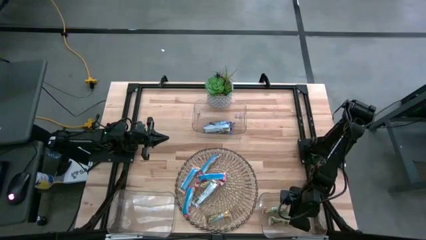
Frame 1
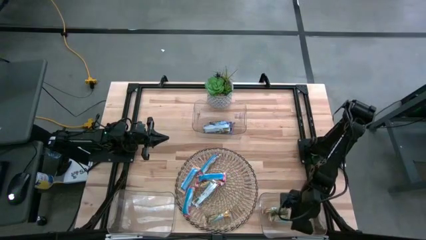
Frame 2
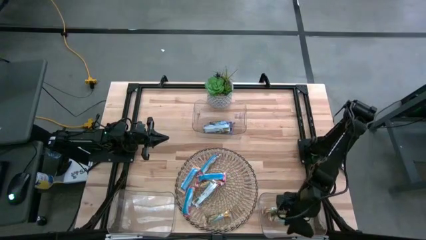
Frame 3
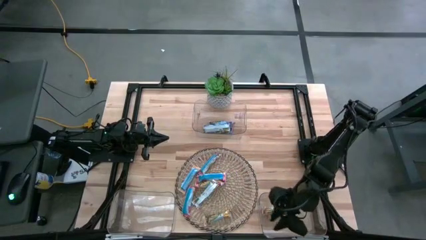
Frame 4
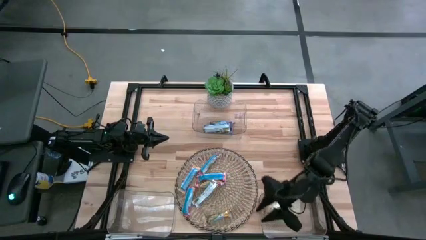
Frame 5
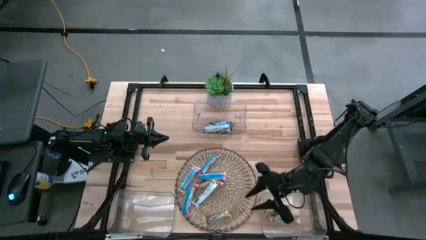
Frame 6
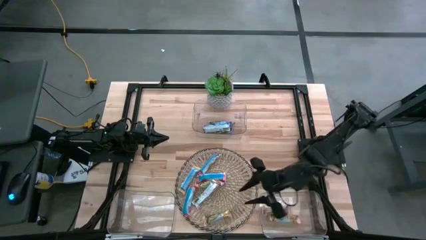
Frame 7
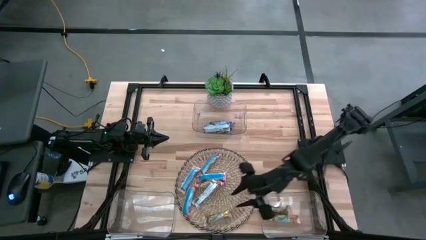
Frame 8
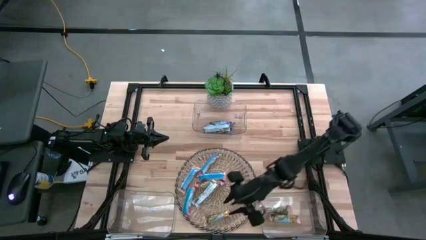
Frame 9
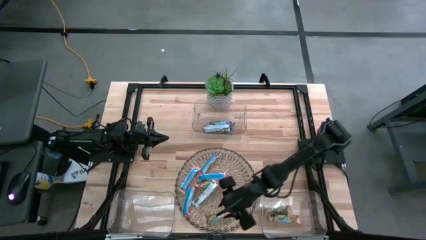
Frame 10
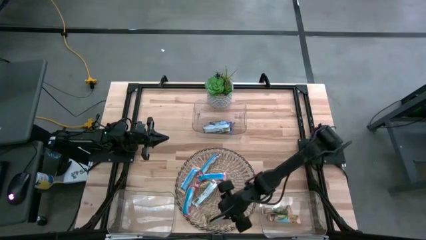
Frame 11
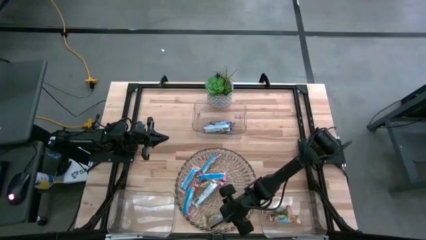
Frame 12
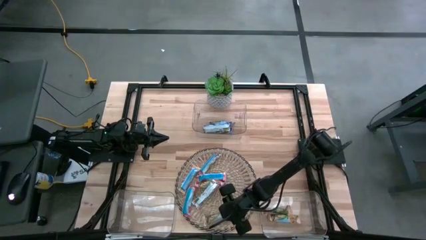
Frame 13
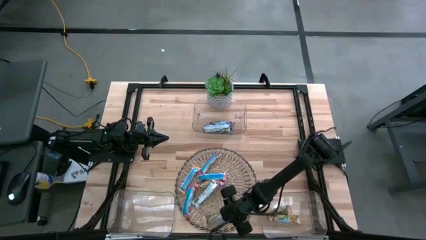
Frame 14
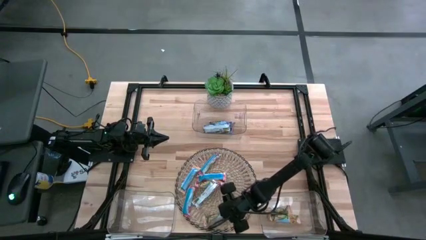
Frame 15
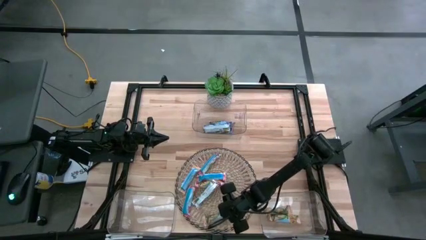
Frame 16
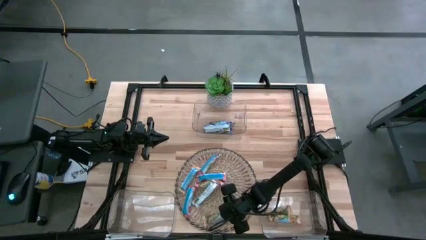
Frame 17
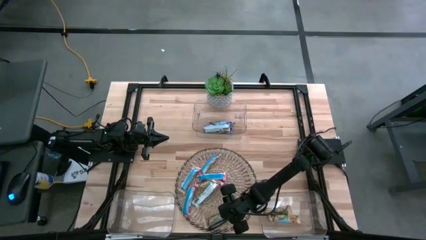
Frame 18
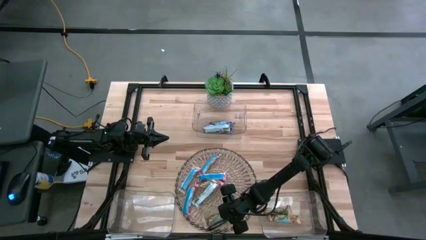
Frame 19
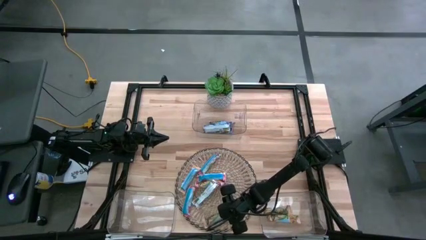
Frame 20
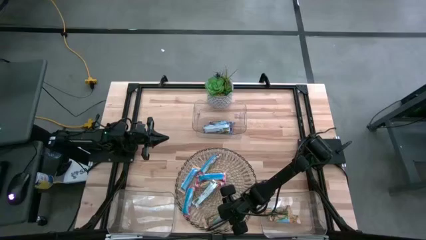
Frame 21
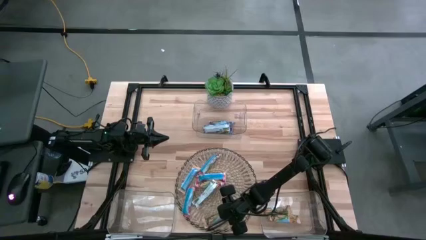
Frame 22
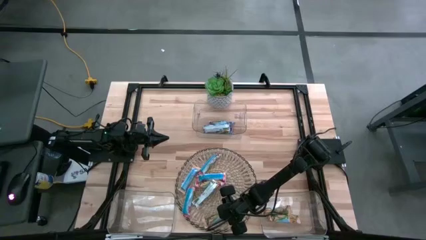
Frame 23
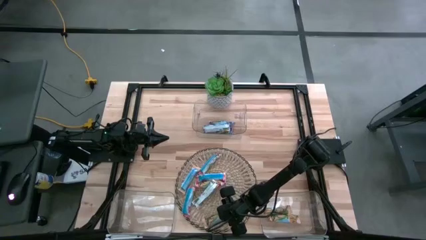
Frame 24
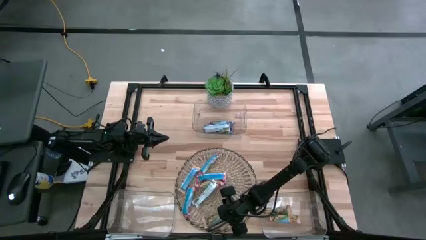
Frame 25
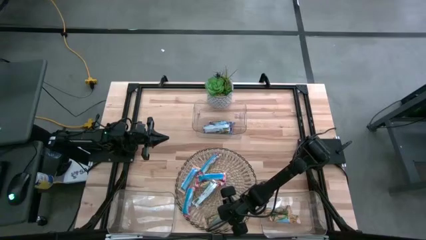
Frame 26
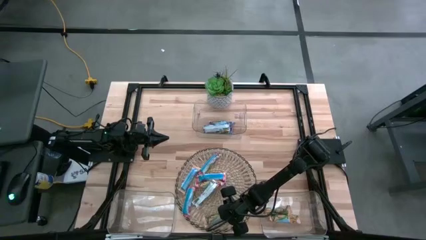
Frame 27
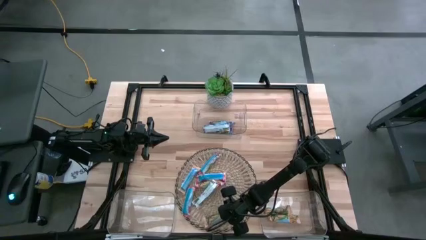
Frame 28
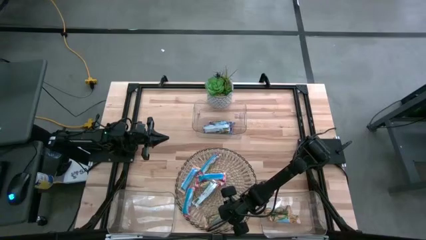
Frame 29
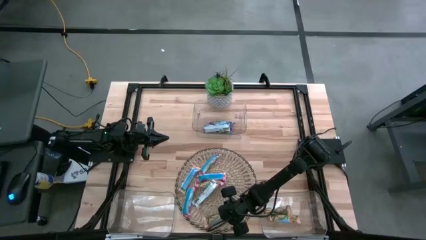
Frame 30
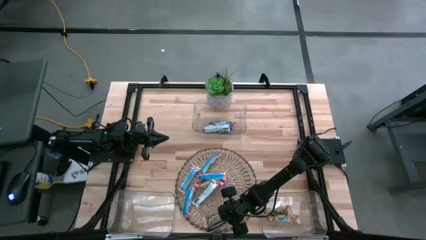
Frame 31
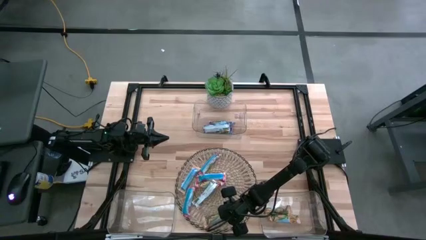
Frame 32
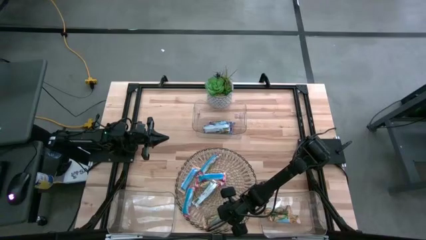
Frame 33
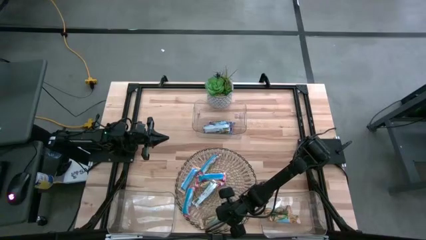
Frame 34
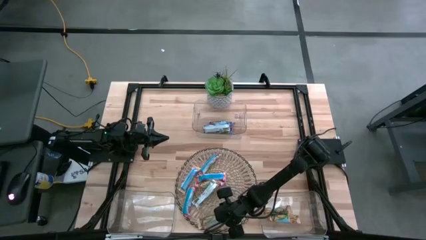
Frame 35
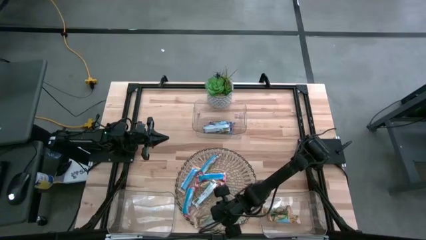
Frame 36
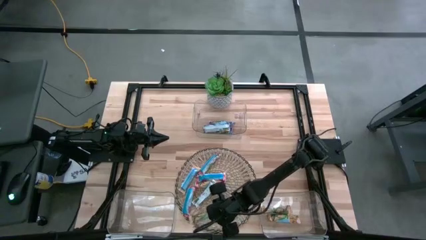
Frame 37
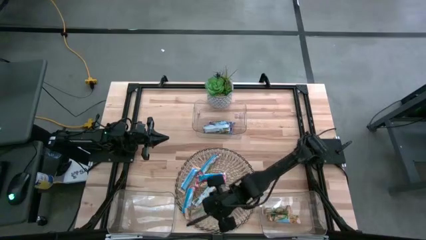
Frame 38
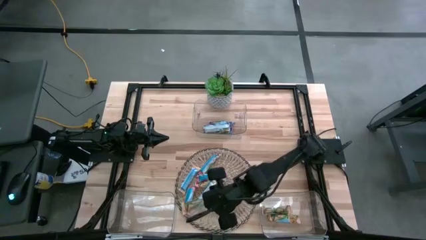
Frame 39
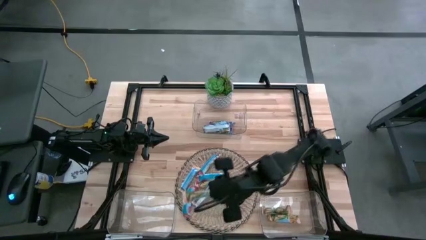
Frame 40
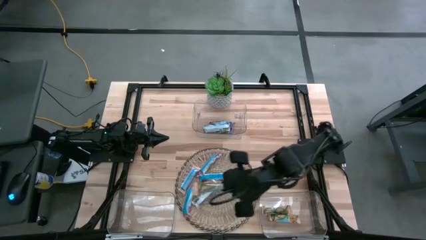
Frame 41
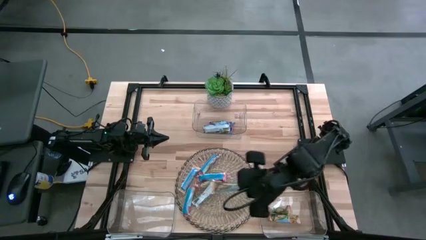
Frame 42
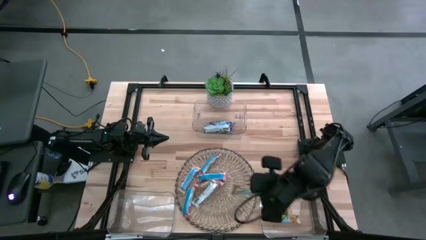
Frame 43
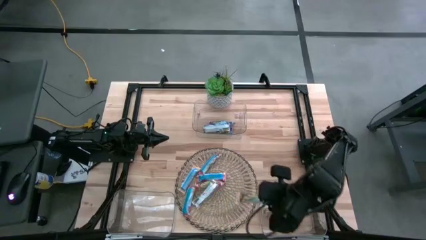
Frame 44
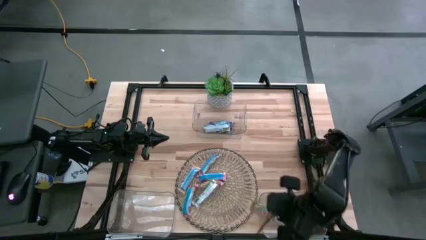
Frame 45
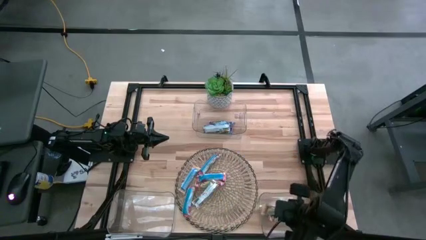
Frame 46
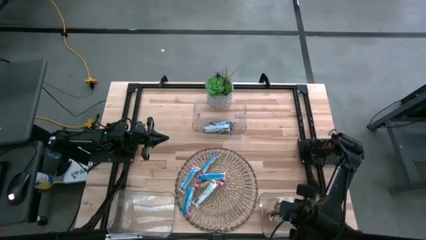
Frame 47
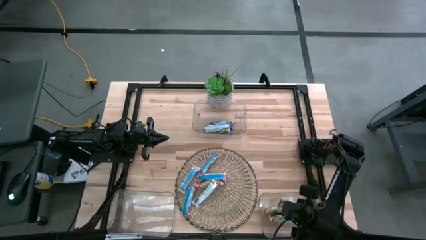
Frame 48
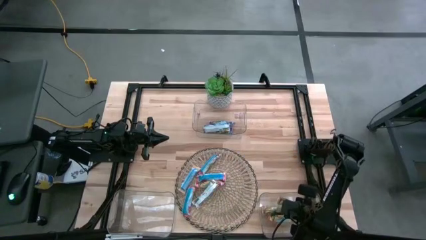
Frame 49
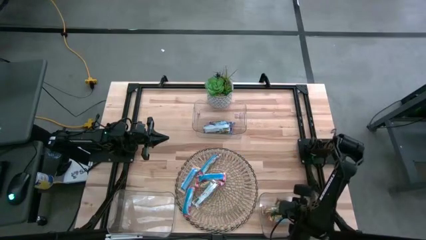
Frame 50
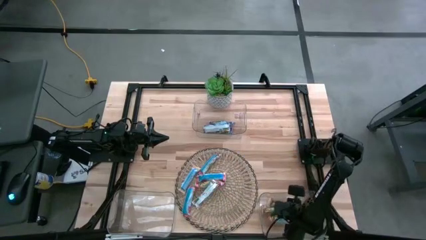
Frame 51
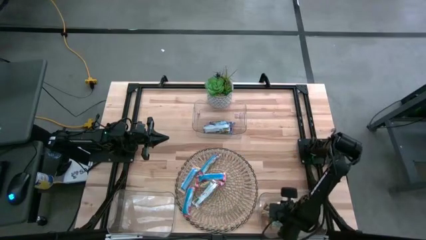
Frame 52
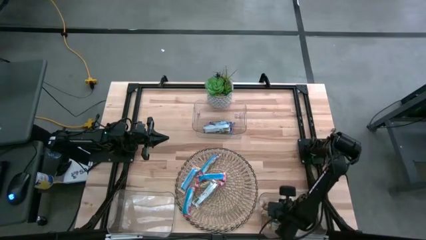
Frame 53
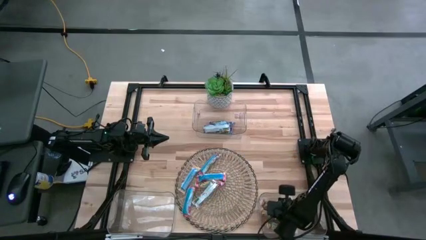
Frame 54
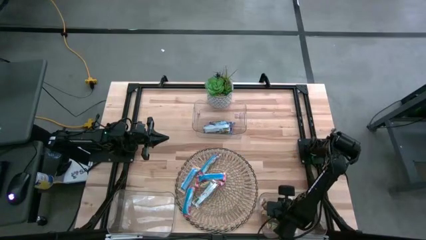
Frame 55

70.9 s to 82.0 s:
Task: Pick and place Granola Bars by type
Put the yellow granola bar into the bottom right transparent bin

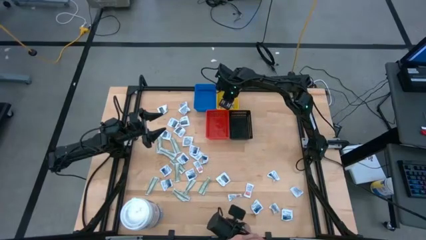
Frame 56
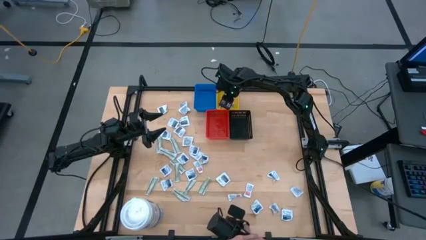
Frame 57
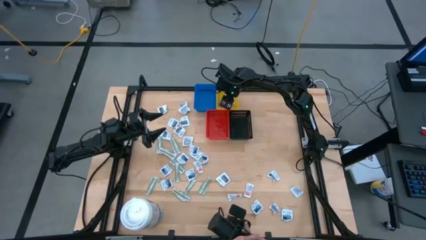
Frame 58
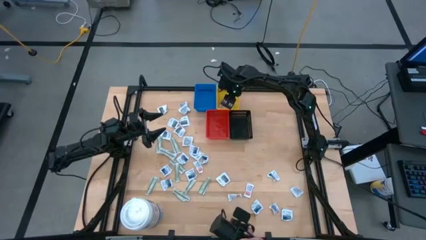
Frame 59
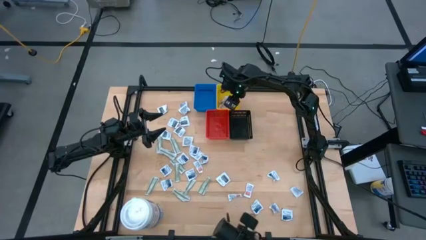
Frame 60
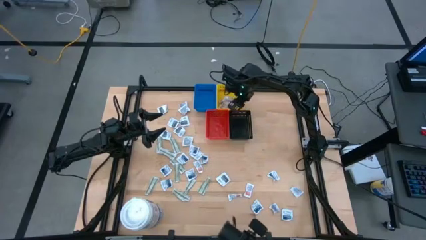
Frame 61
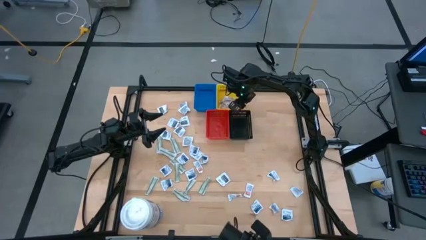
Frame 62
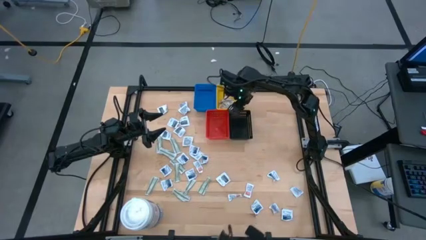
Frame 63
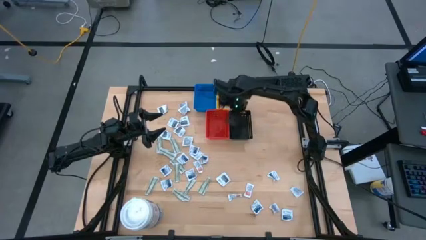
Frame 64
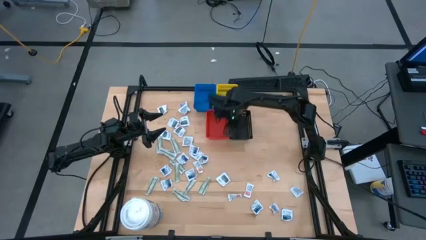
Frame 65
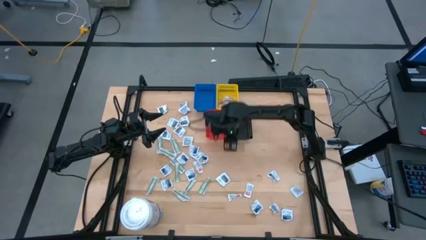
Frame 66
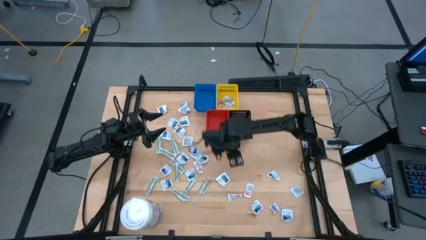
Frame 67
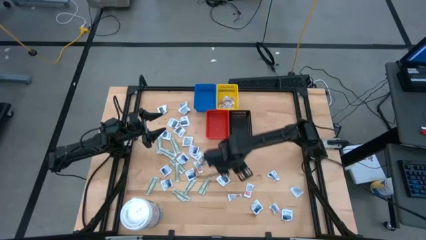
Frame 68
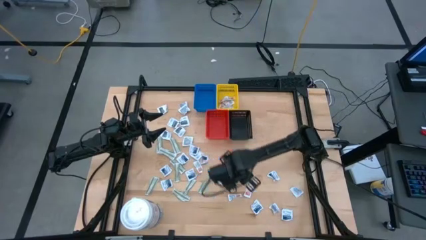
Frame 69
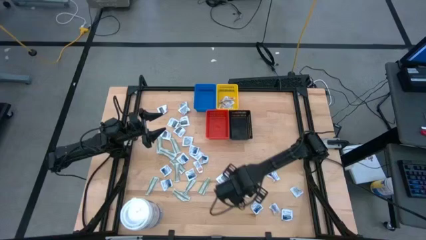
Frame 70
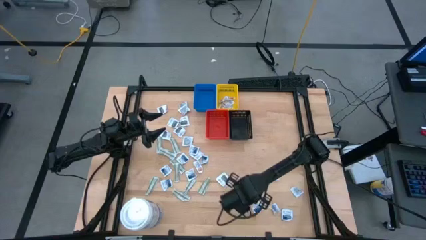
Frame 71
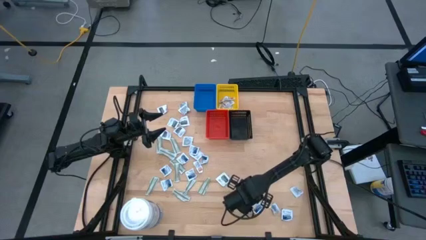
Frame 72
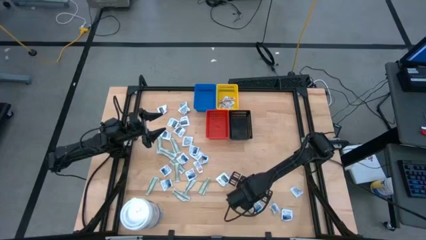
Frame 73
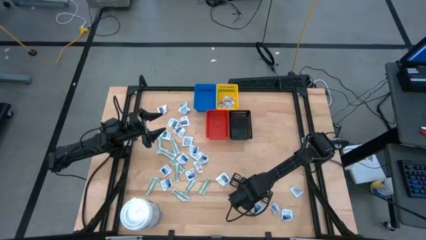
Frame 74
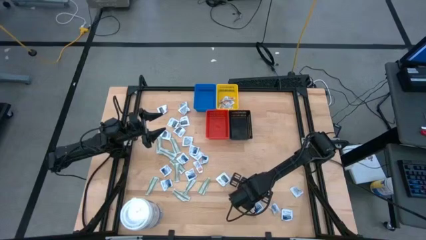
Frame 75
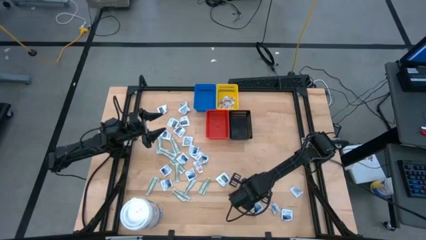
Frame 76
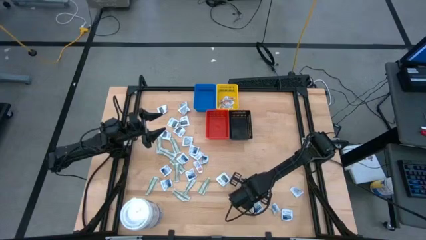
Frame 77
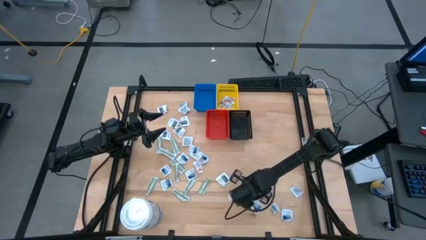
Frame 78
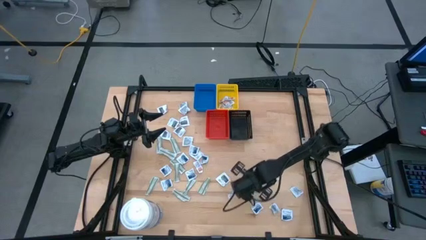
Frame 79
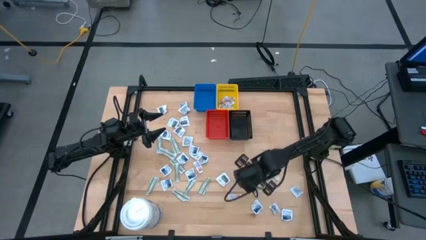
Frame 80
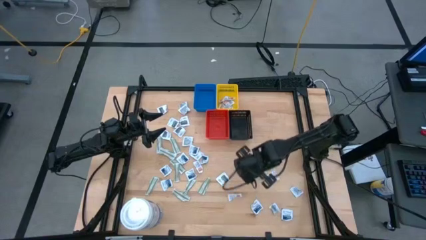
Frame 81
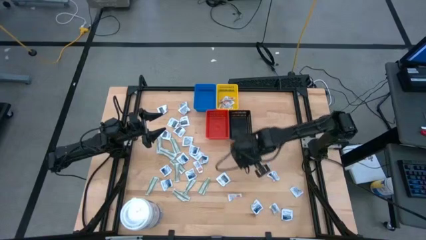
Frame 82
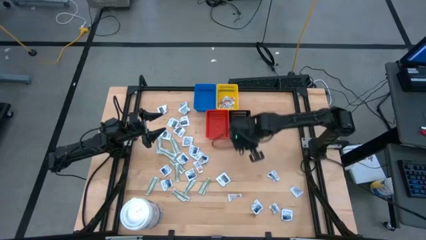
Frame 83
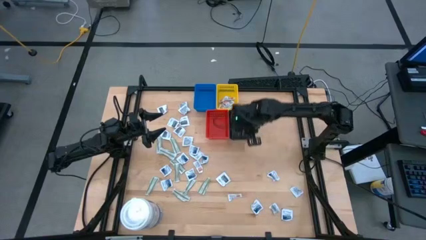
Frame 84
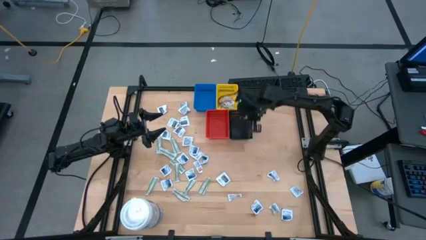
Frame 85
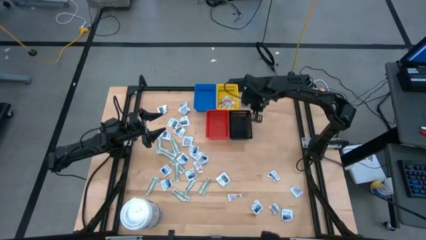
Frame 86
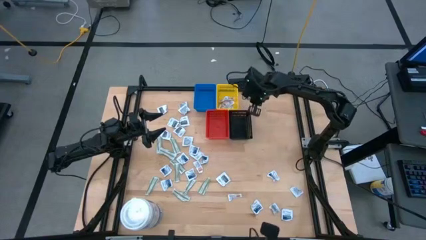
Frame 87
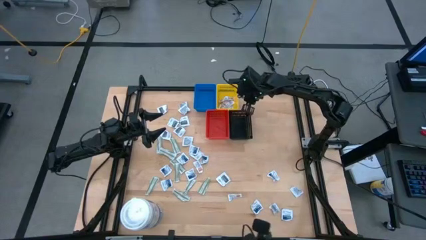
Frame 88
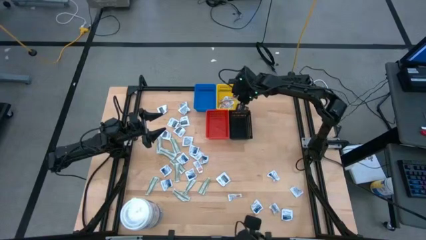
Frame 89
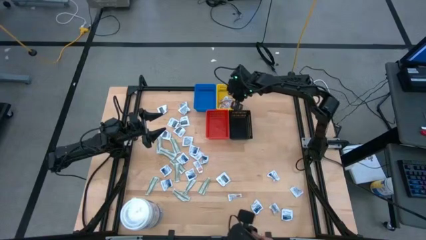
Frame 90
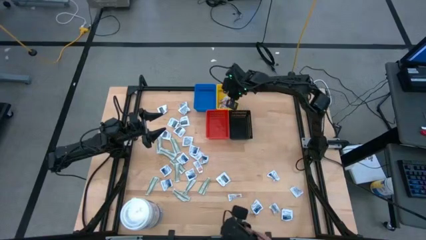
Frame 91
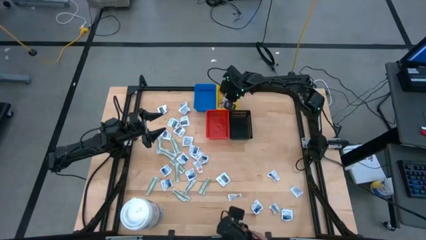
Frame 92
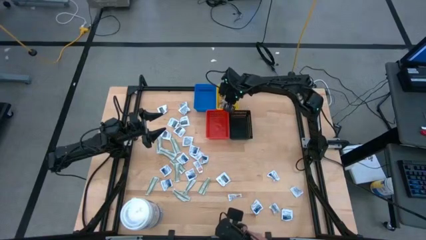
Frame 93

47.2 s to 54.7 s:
Task: Pick & Place First Aid Supplies
Put the bottom right ointment pack into the yellow bin
